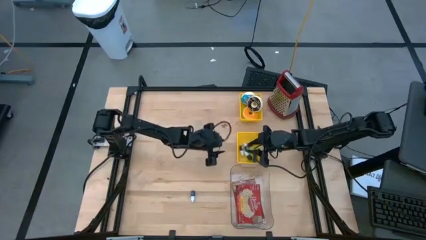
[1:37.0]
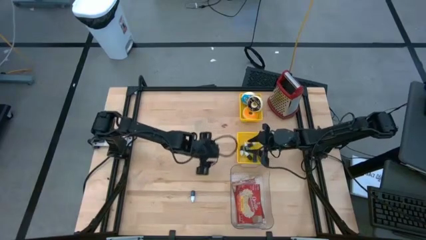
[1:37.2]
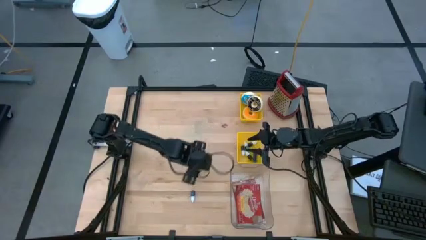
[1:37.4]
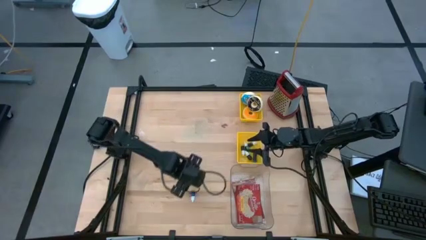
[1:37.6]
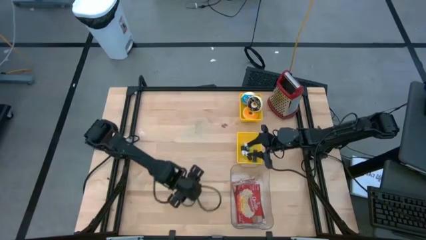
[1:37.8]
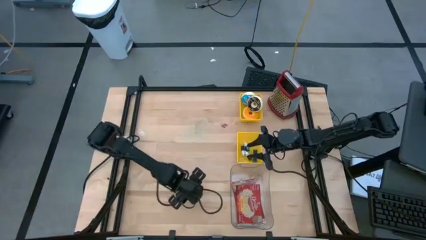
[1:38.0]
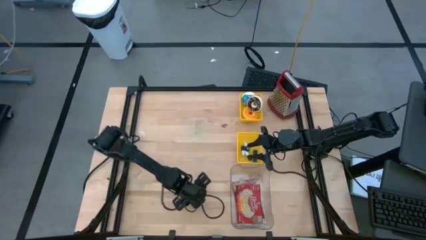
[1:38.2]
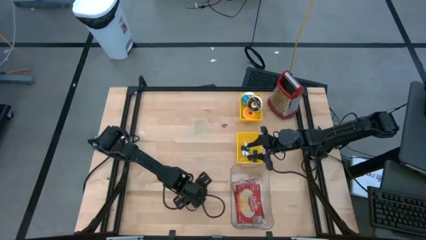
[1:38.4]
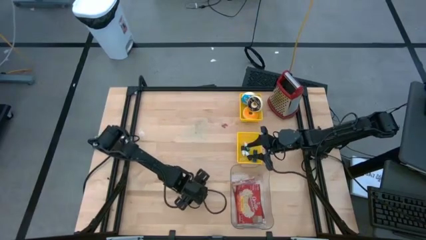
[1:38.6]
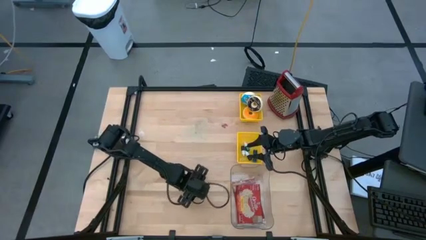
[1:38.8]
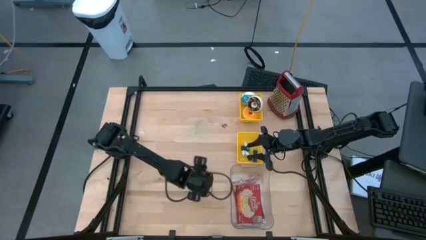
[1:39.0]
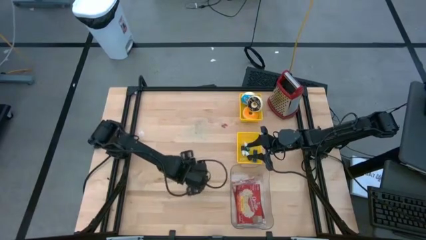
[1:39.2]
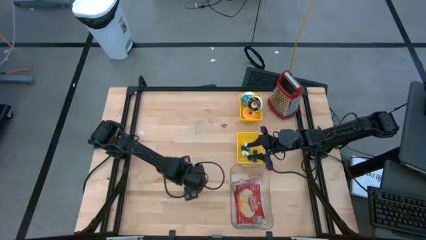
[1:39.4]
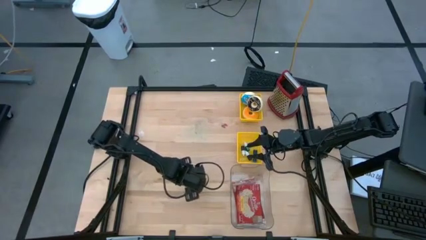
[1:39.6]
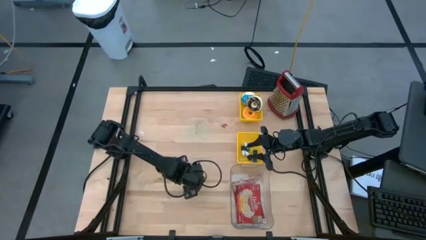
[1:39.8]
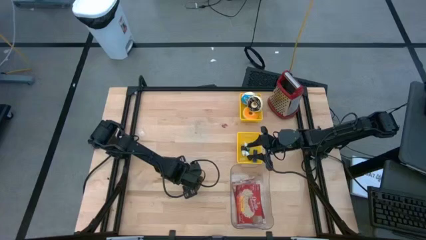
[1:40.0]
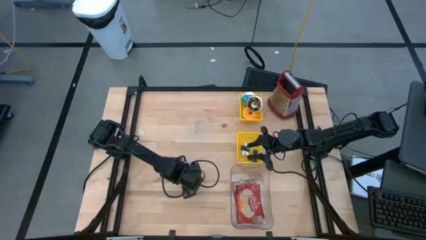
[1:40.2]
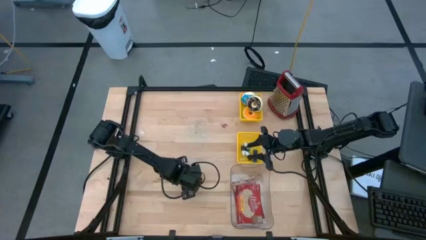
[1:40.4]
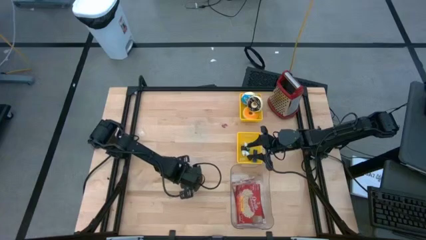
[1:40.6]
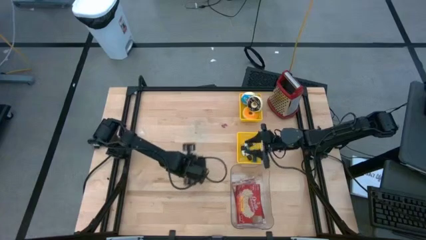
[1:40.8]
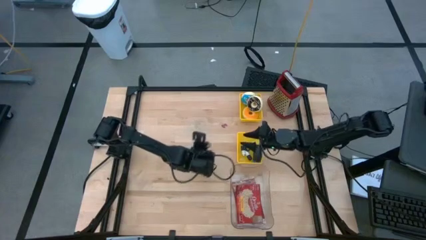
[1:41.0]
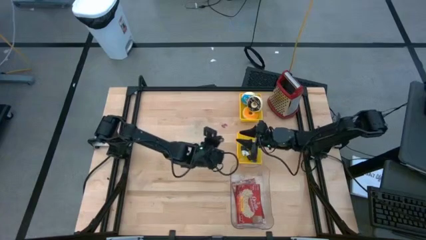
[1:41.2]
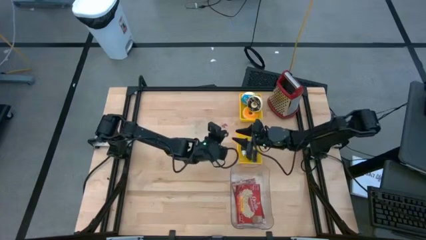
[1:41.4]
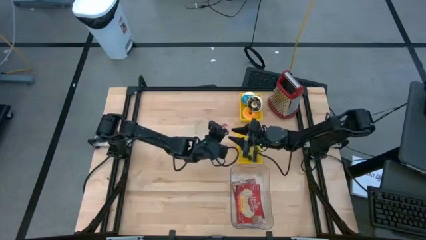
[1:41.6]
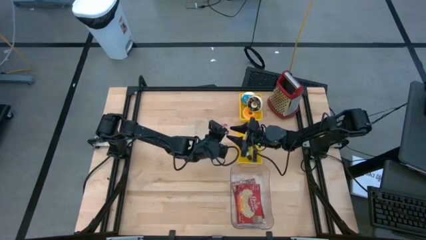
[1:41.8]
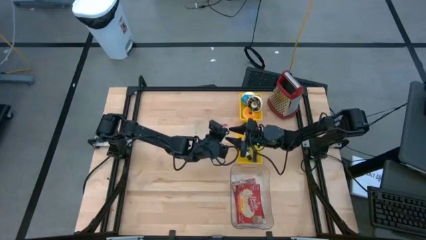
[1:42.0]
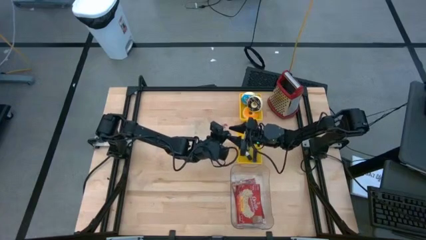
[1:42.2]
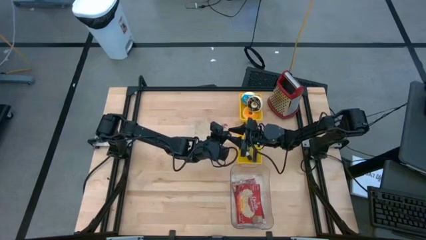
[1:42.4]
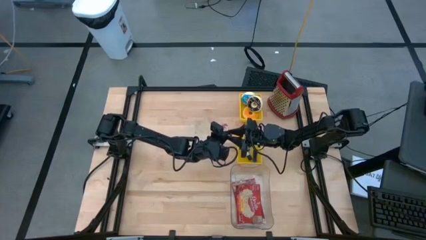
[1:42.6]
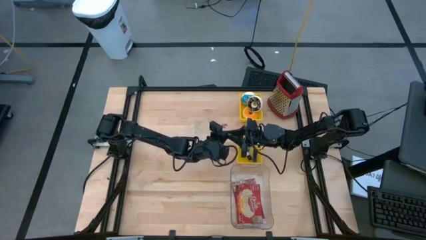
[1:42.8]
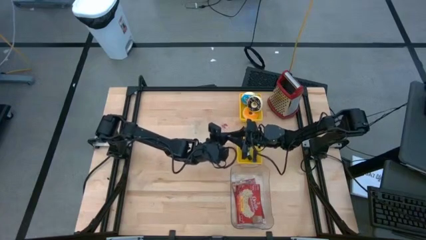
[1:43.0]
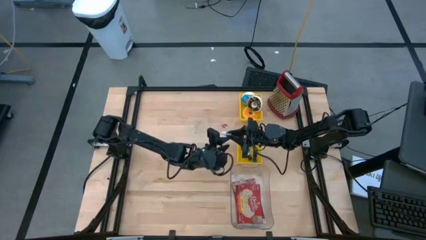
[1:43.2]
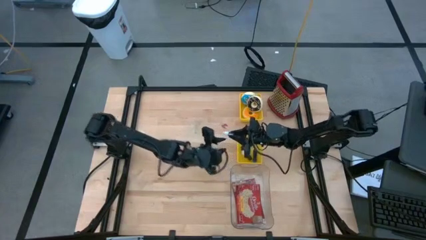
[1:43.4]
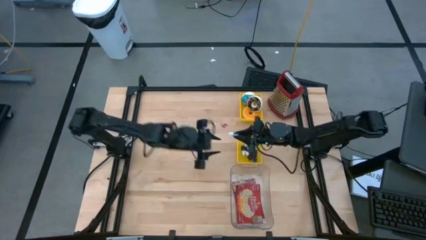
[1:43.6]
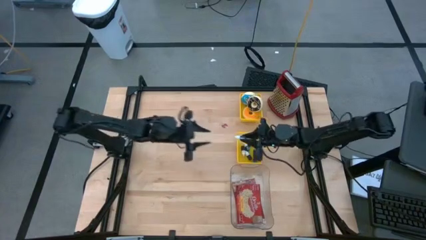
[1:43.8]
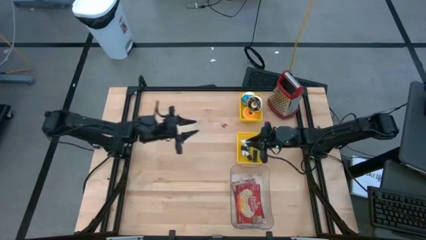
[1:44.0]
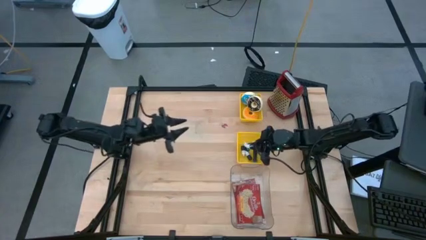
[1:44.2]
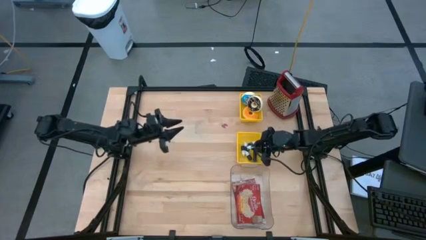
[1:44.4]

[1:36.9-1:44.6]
Put the blue food coloring bottle into the bottom yellow bin

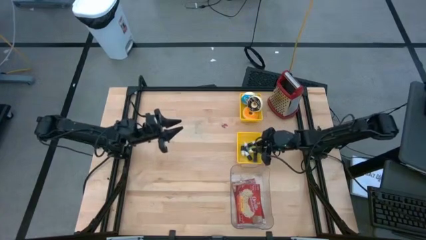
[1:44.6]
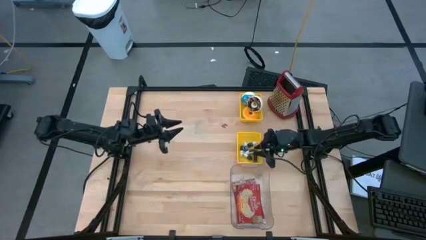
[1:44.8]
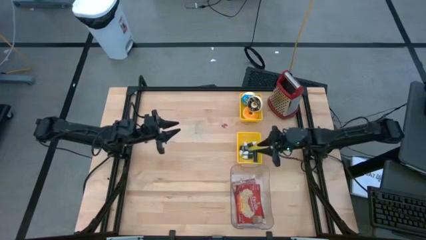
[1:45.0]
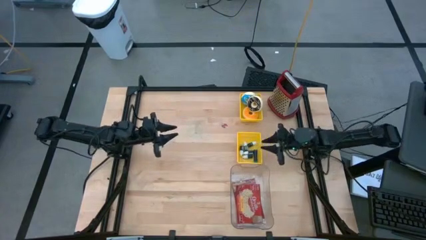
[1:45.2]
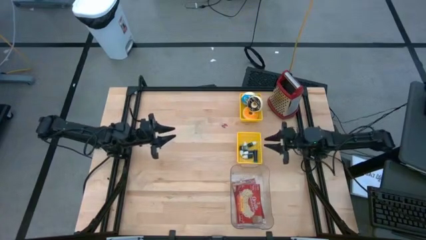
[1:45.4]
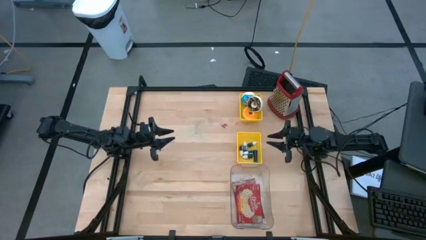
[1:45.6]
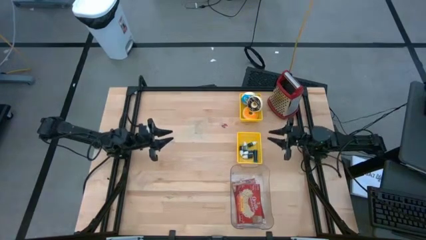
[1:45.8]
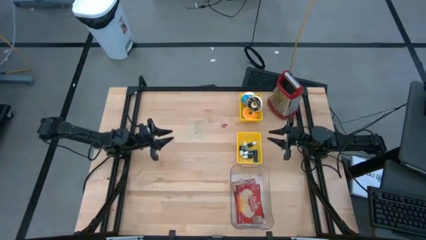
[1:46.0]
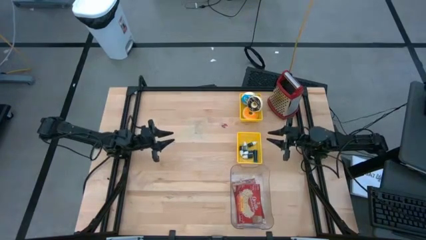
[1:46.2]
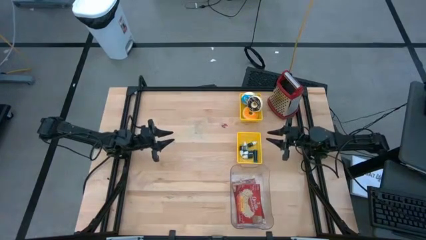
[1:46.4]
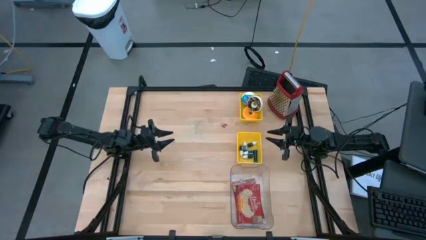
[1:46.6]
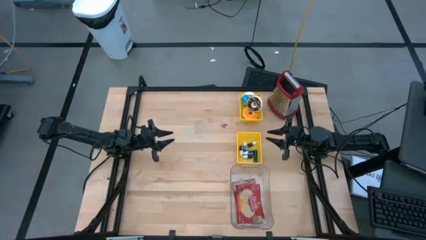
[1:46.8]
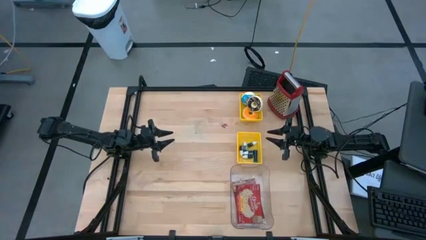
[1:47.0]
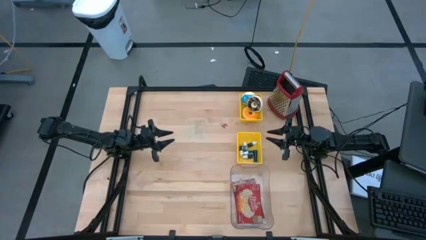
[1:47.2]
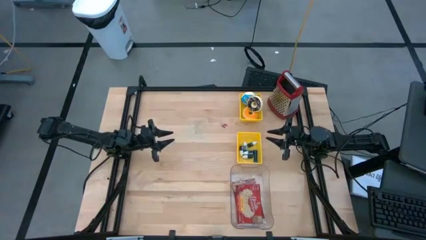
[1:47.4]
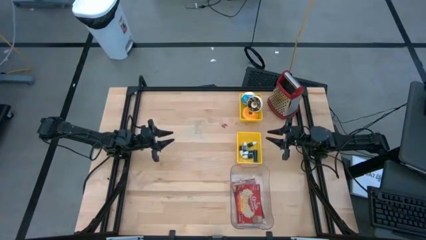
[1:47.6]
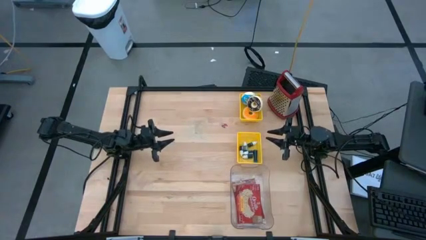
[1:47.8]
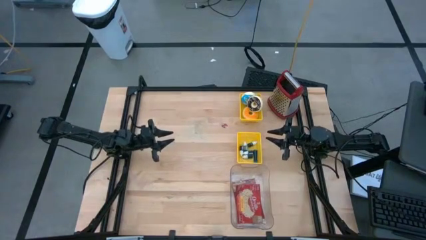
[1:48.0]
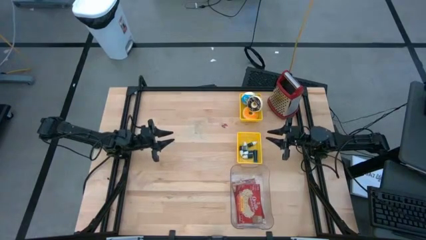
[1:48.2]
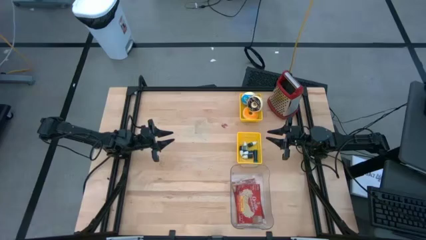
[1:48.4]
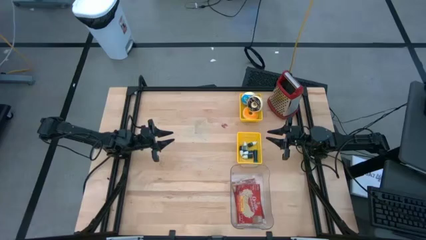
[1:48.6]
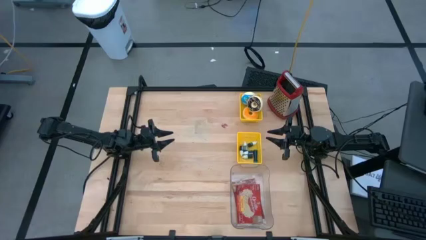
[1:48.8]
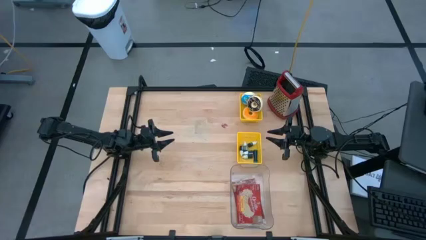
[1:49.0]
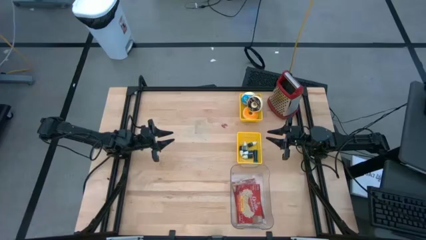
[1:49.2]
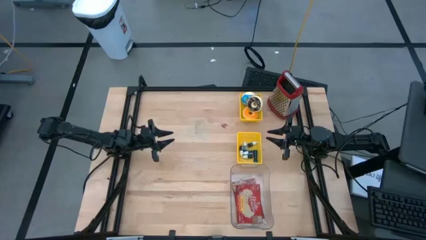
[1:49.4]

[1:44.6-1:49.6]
Return to Home Position
